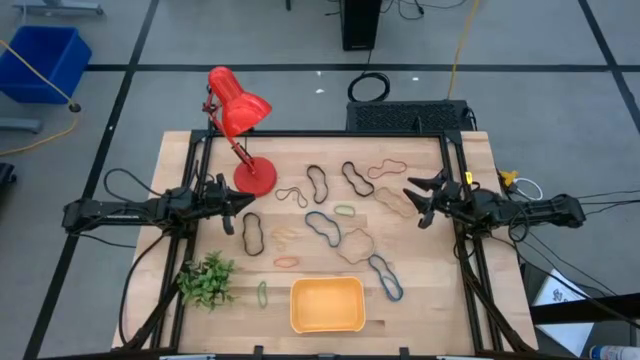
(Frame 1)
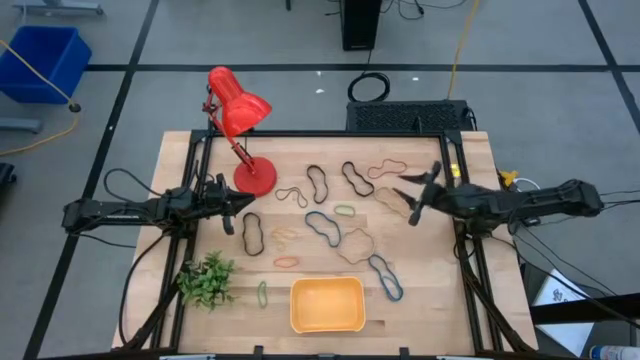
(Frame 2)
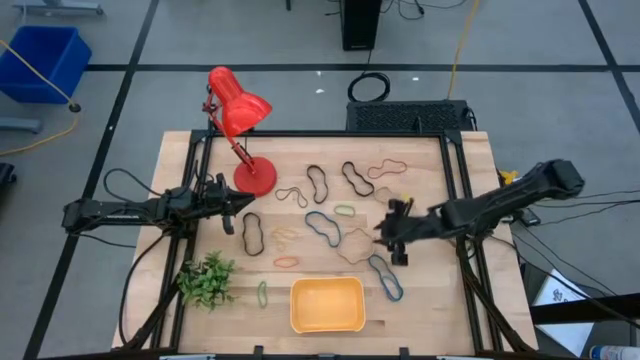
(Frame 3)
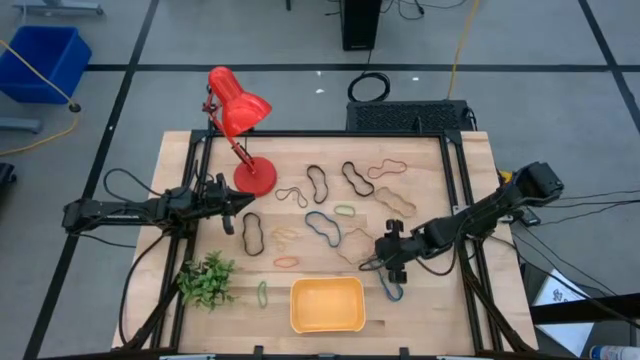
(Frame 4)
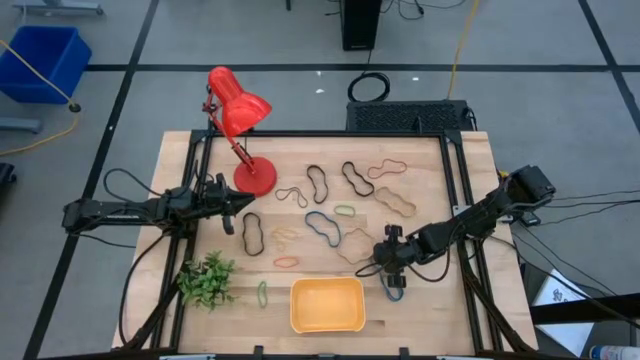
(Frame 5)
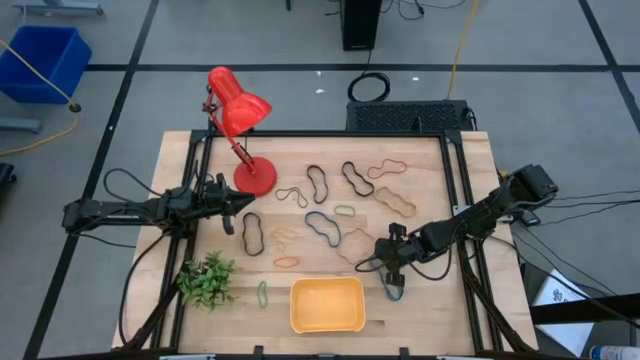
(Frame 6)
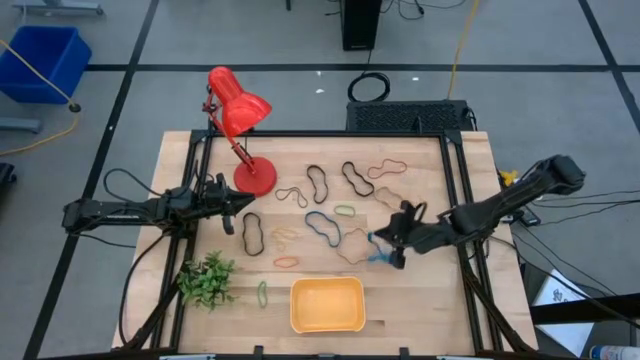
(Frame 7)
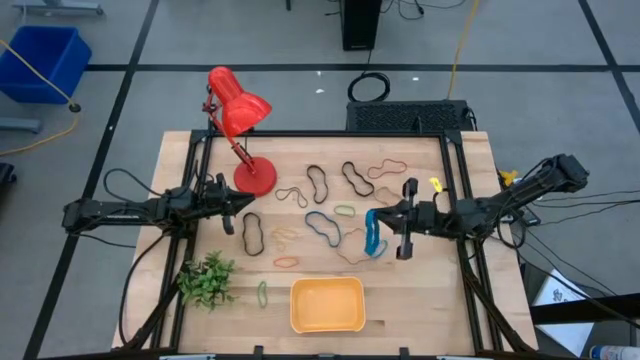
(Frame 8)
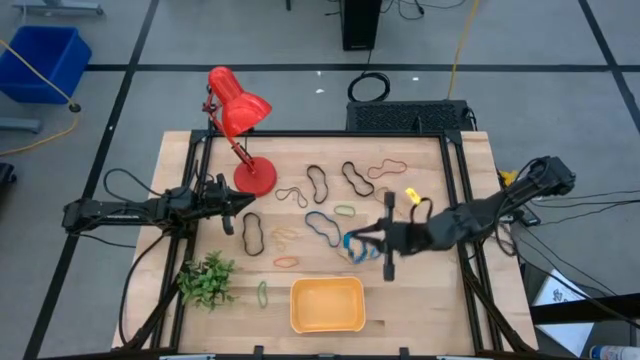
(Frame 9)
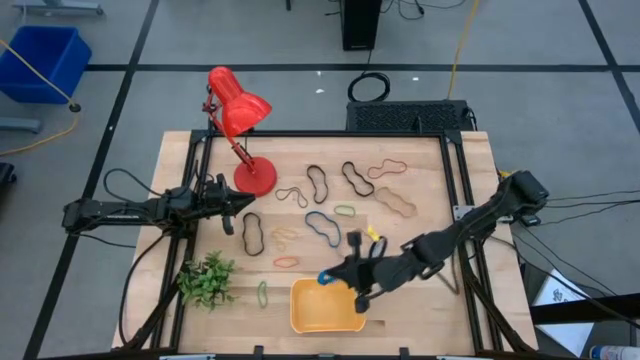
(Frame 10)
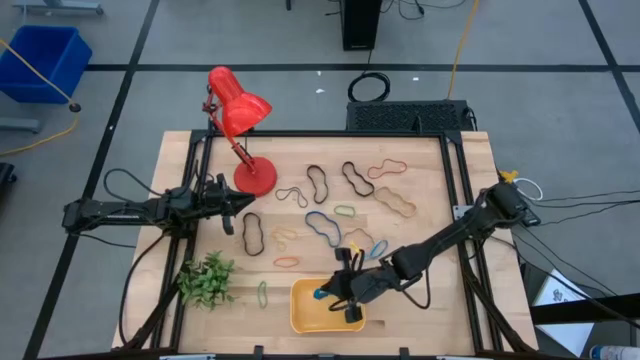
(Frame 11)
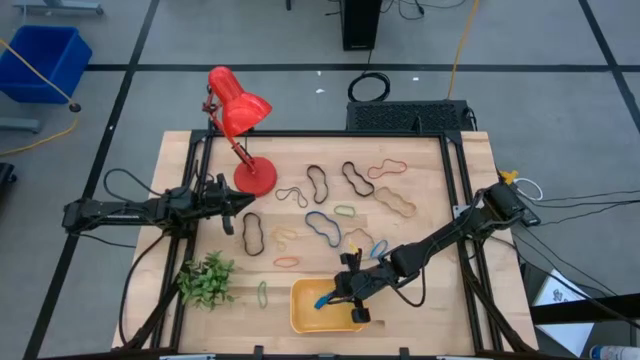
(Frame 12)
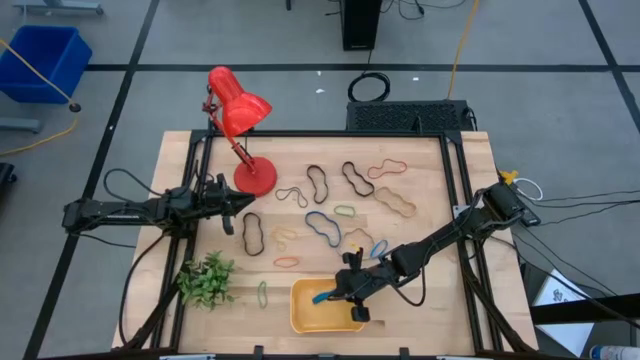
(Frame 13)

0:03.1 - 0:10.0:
Task: Pick and place rubber bands into bin
Put the bottom blue rubber band into the bin

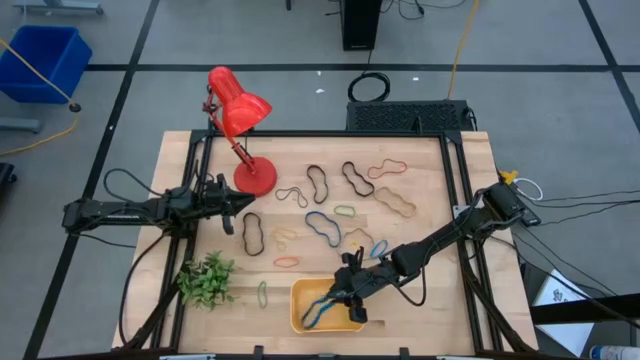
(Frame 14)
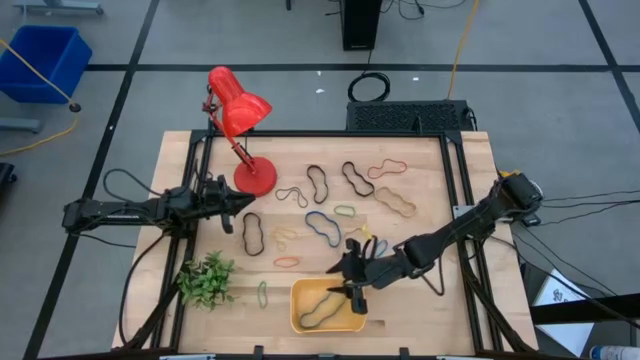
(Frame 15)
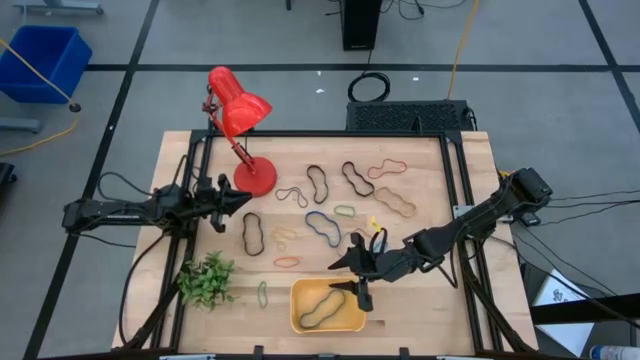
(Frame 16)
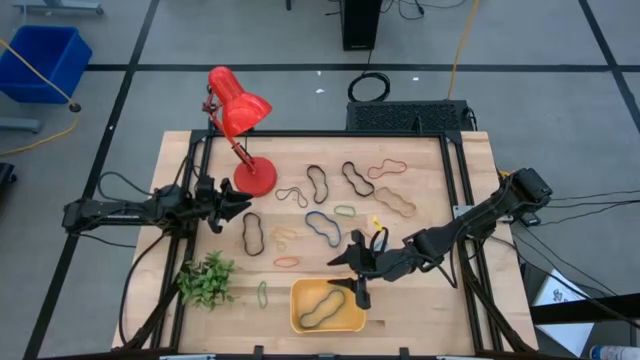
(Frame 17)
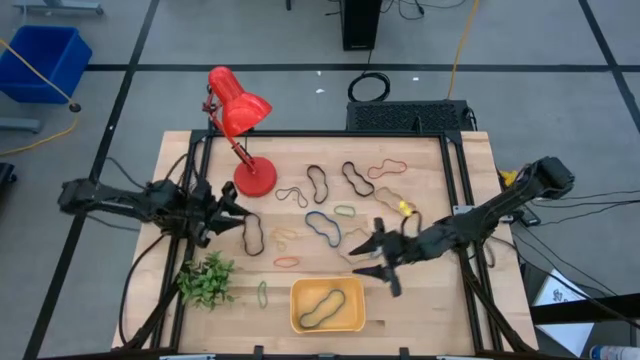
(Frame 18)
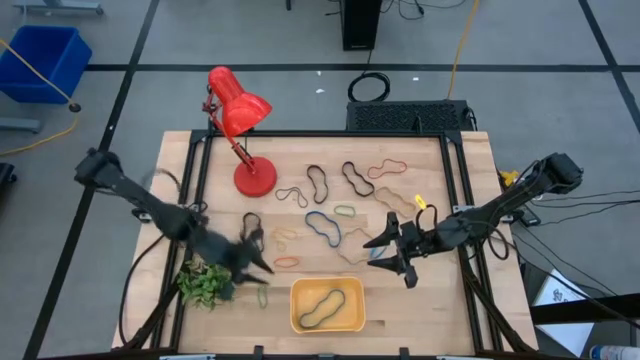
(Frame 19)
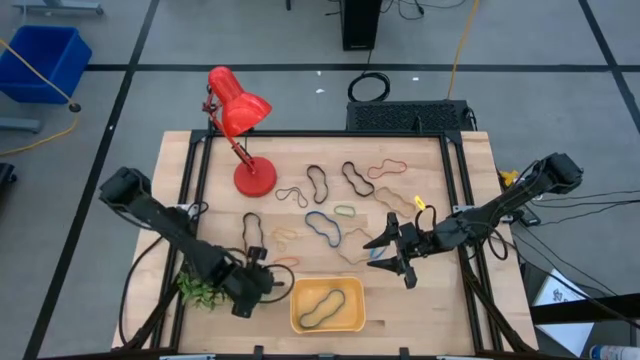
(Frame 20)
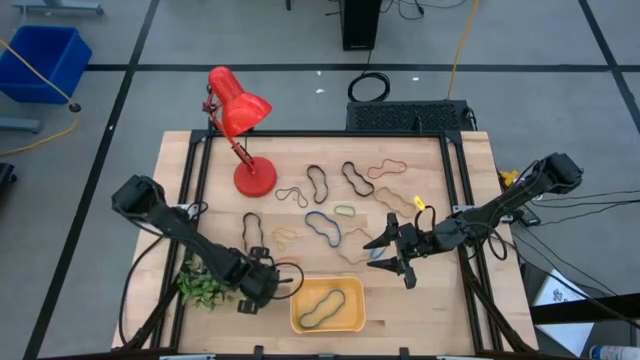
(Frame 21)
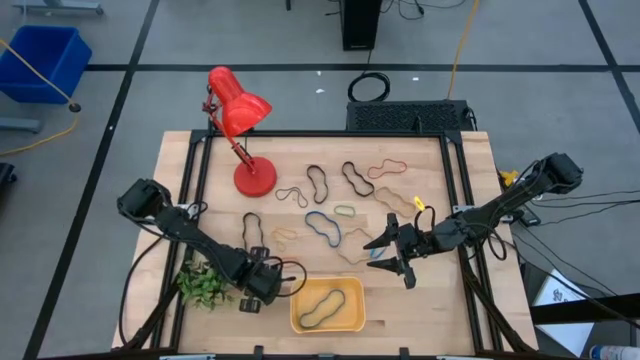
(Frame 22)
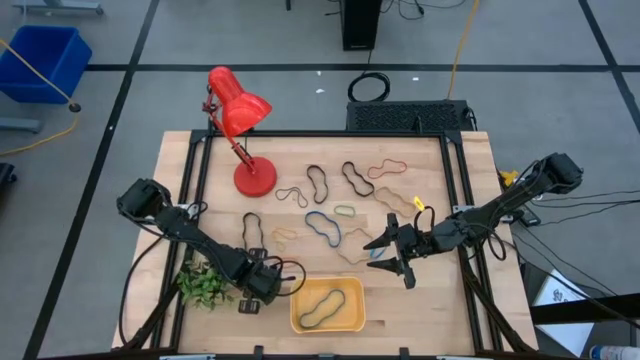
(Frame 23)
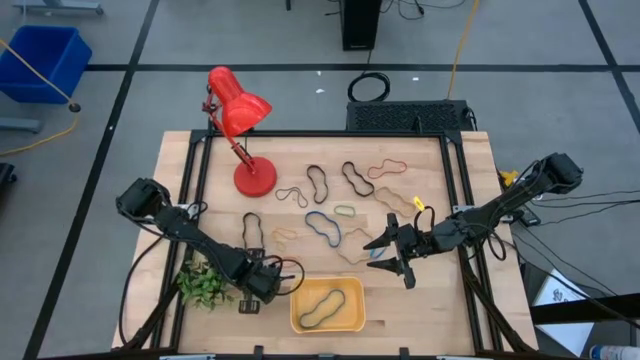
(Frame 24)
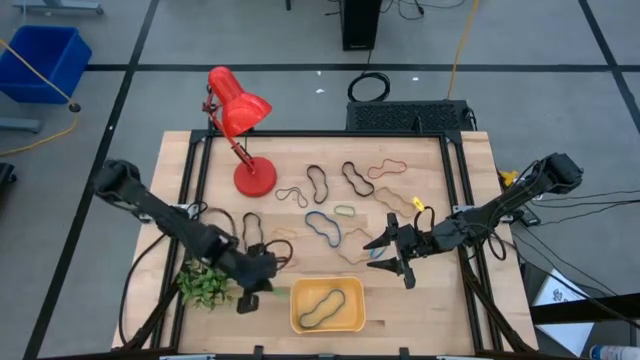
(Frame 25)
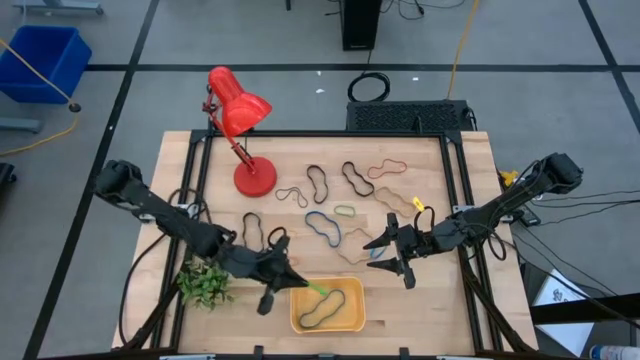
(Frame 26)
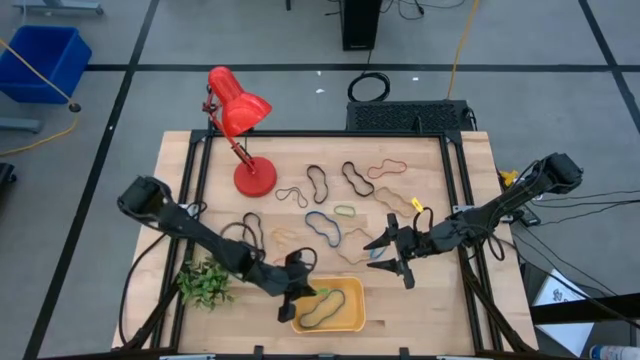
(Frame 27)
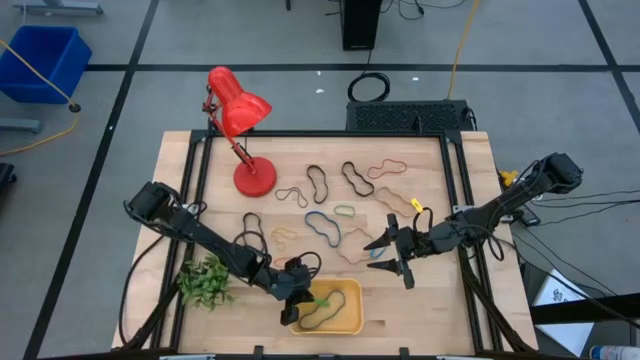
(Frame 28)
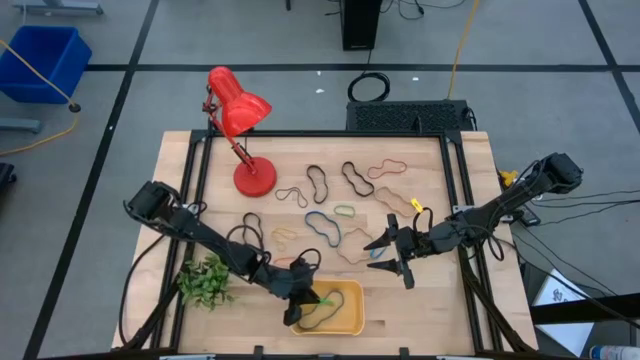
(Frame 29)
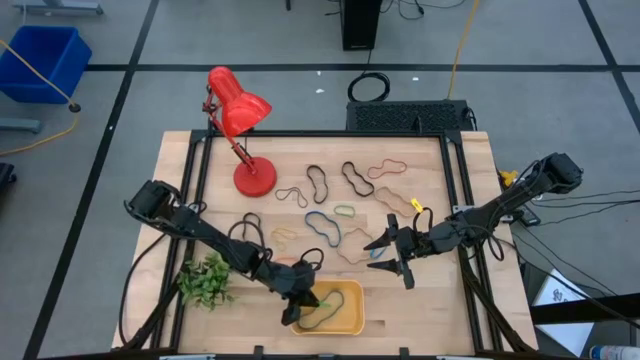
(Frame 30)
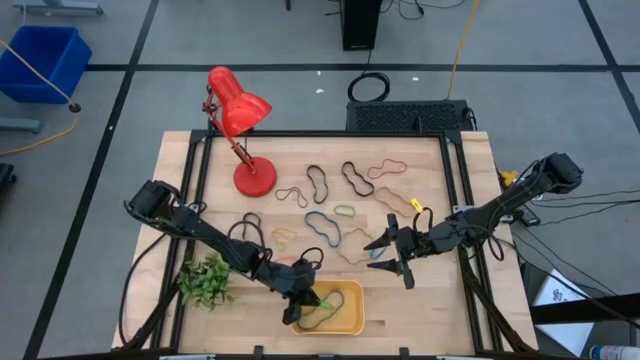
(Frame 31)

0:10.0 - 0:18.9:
Put the bottom green rubber band into the bin

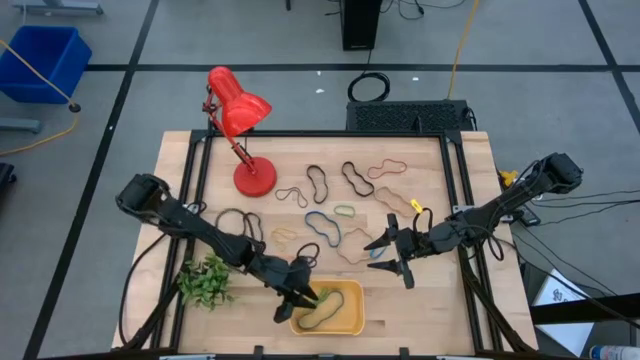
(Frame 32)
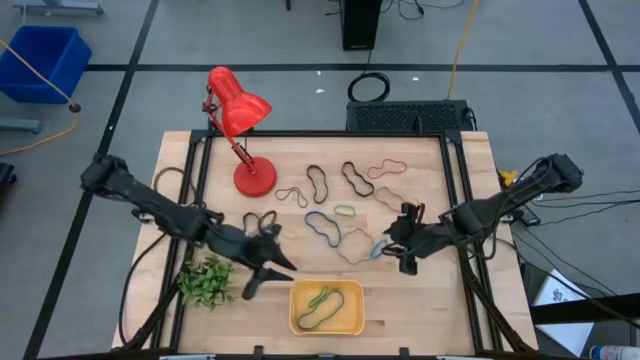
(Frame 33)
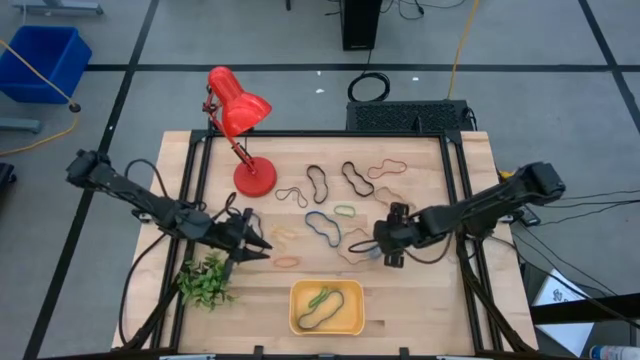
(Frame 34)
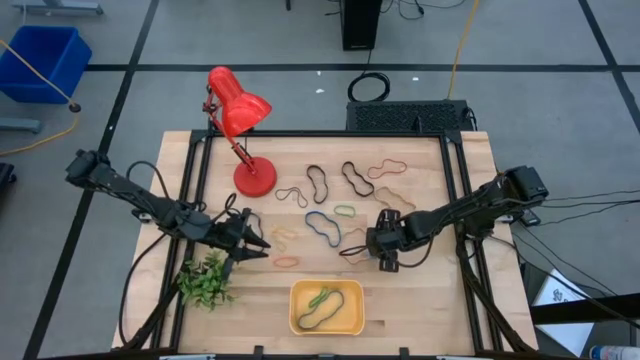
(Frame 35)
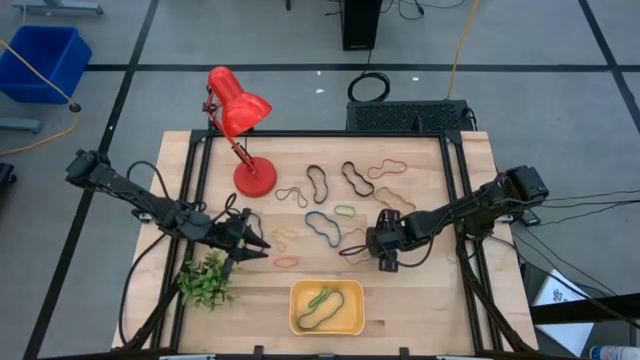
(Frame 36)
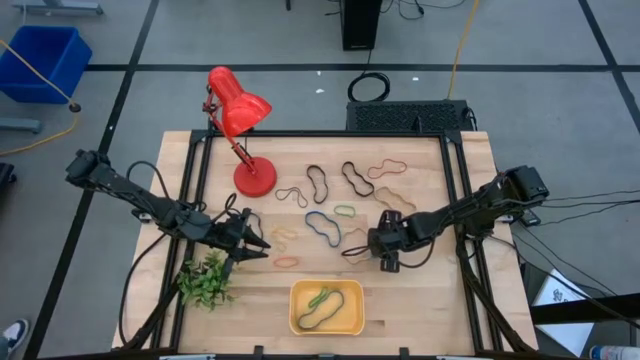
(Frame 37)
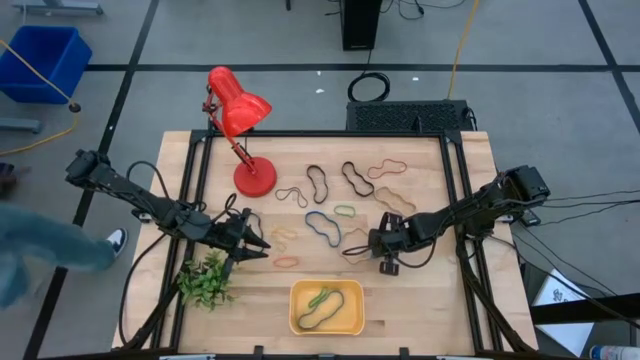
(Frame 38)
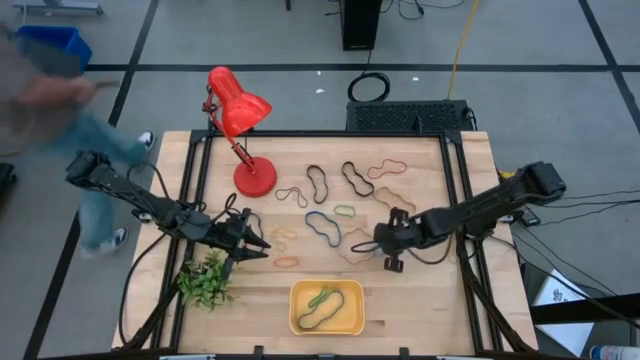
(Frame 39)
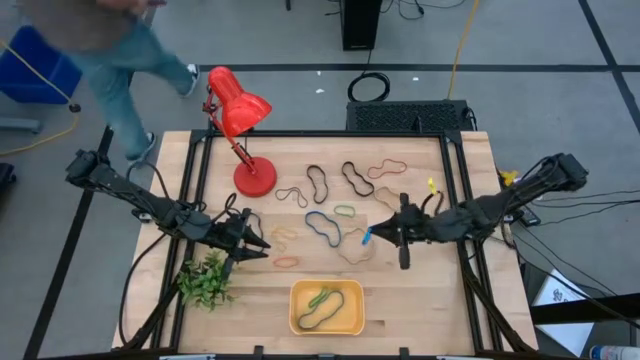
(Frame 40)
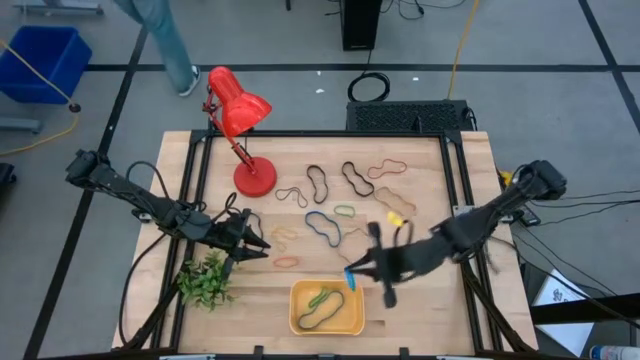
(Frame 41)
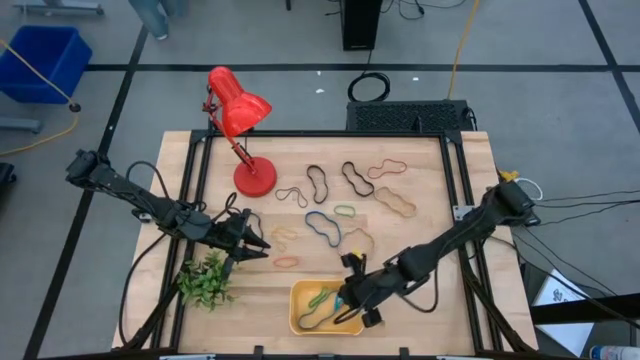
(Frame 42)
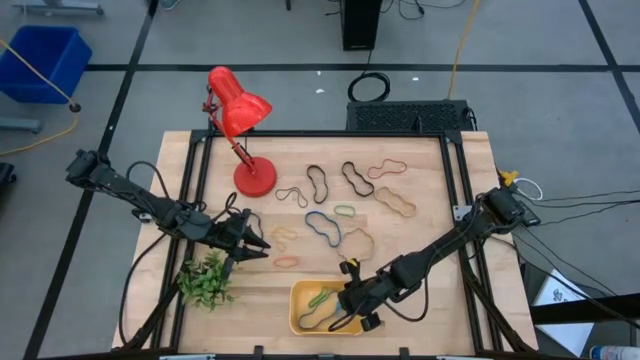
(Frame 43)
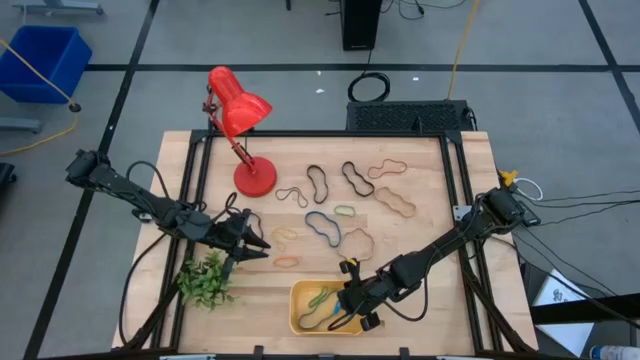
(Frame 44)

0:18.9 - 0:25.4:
Put the bottom blue rubber band into the bin
